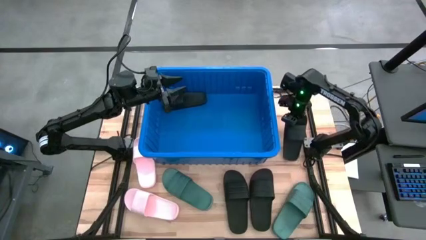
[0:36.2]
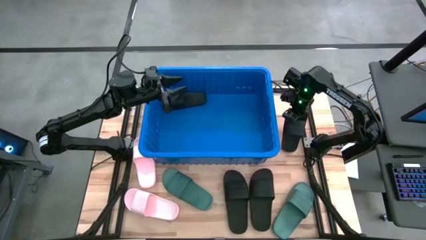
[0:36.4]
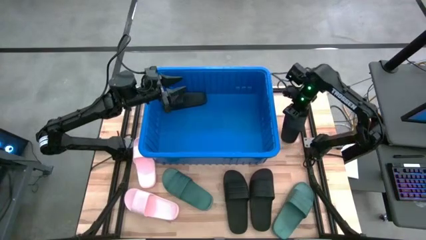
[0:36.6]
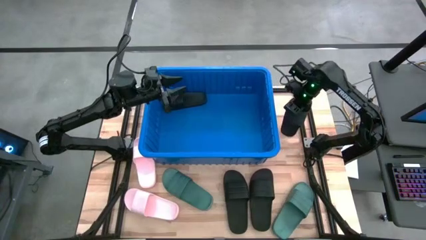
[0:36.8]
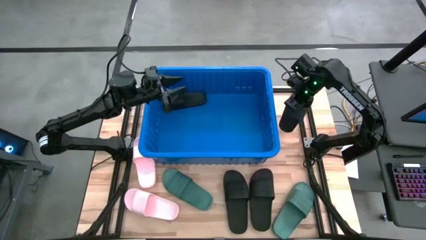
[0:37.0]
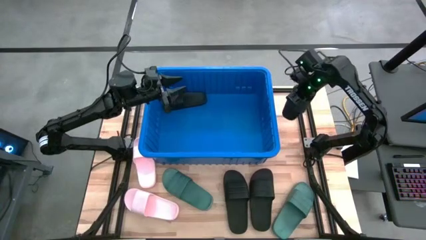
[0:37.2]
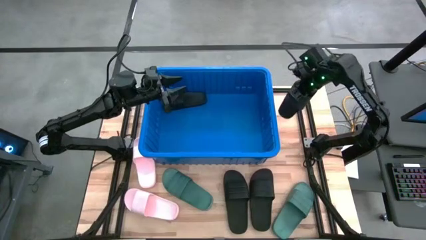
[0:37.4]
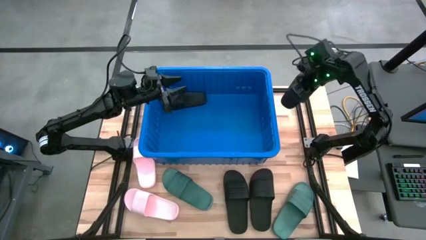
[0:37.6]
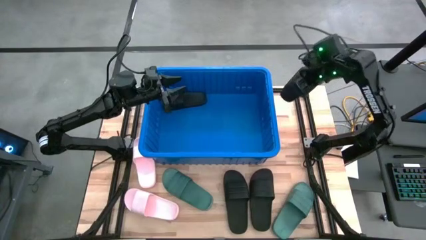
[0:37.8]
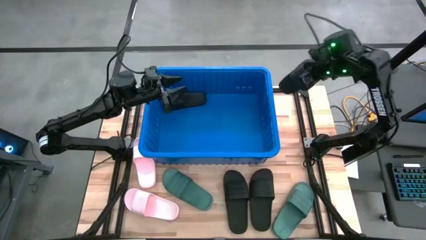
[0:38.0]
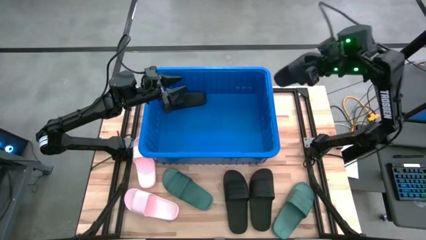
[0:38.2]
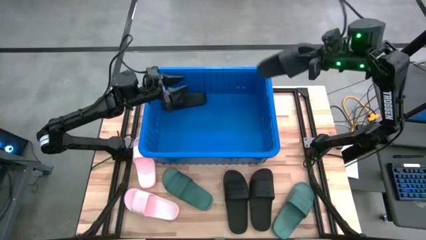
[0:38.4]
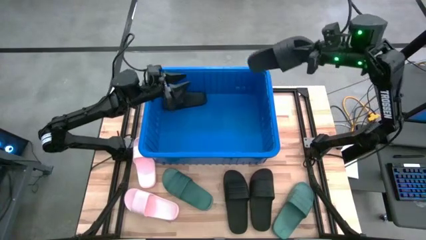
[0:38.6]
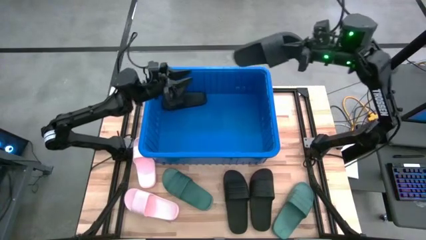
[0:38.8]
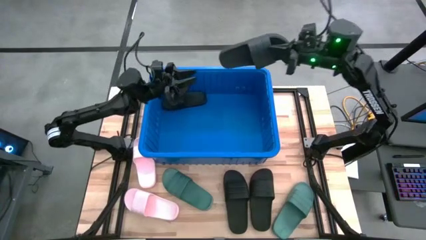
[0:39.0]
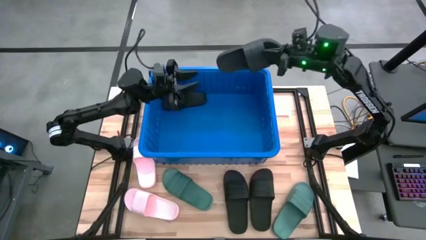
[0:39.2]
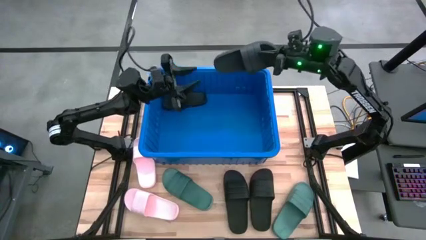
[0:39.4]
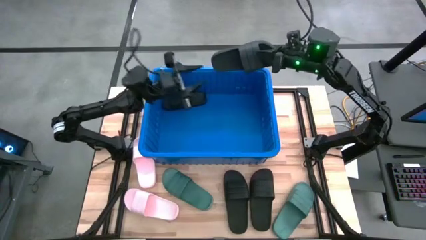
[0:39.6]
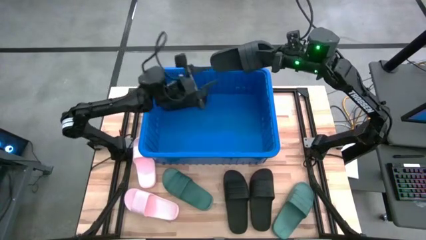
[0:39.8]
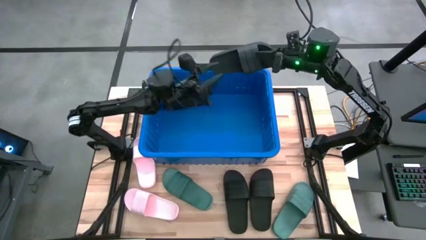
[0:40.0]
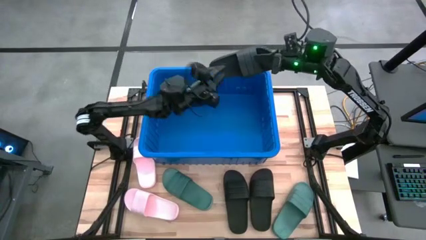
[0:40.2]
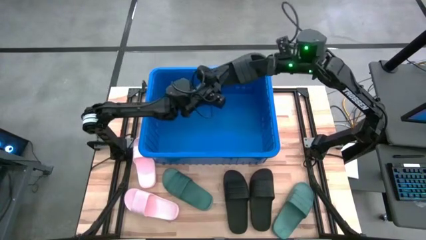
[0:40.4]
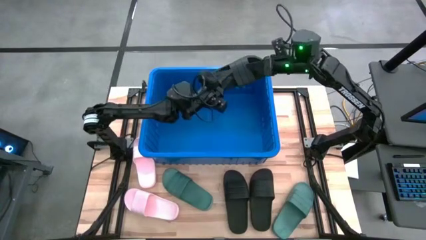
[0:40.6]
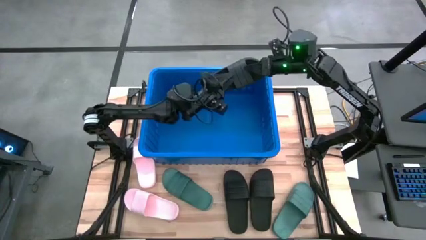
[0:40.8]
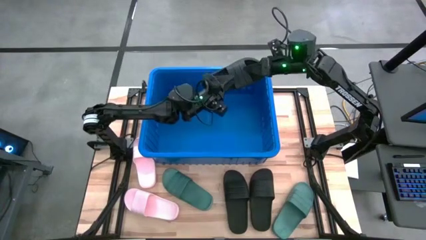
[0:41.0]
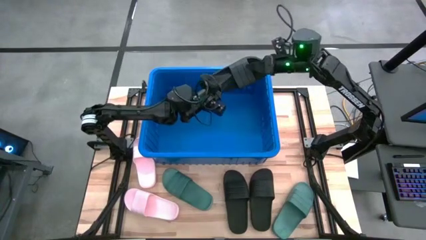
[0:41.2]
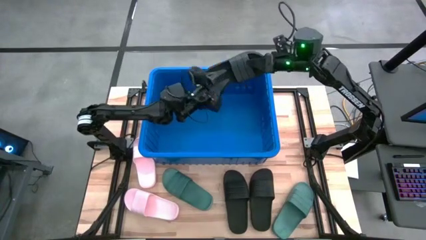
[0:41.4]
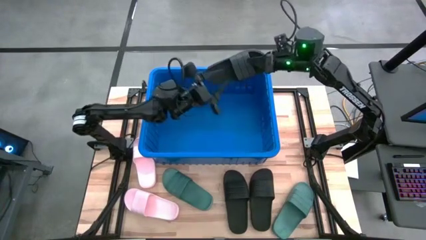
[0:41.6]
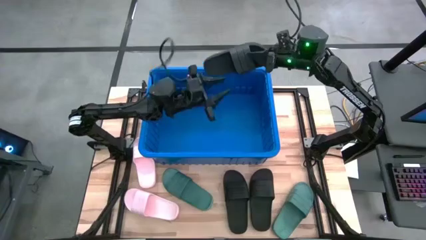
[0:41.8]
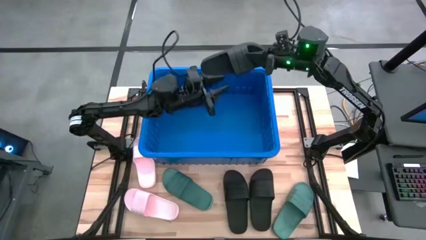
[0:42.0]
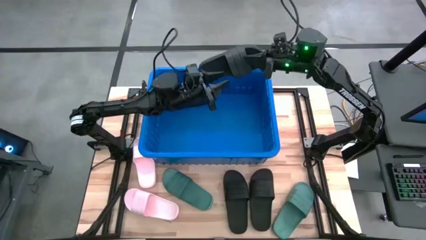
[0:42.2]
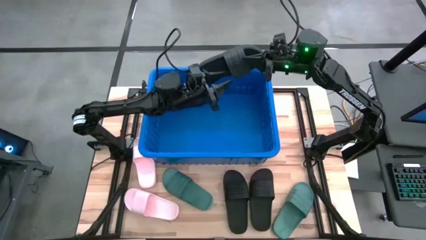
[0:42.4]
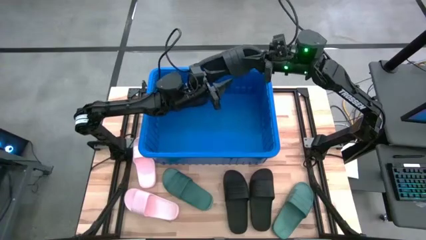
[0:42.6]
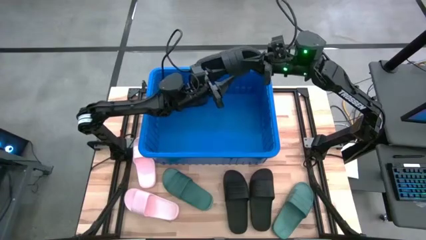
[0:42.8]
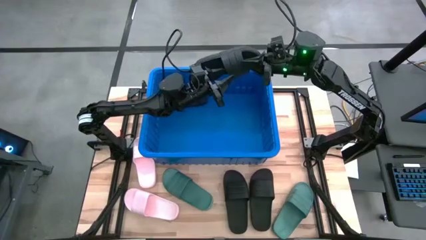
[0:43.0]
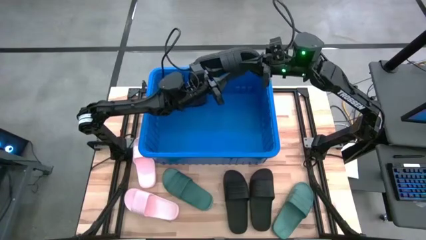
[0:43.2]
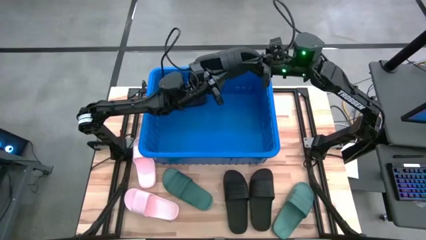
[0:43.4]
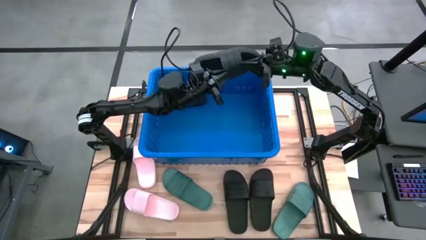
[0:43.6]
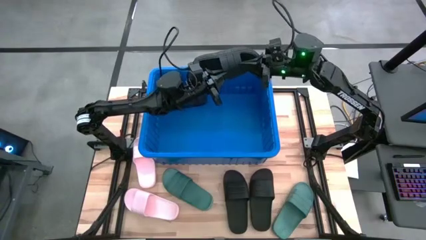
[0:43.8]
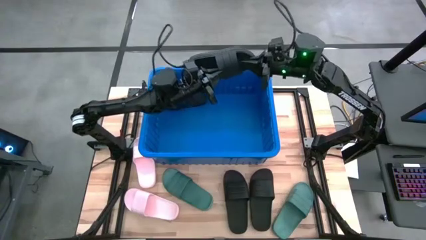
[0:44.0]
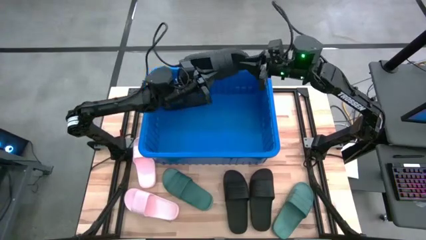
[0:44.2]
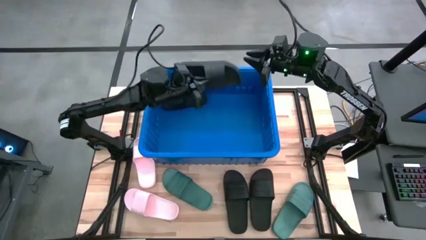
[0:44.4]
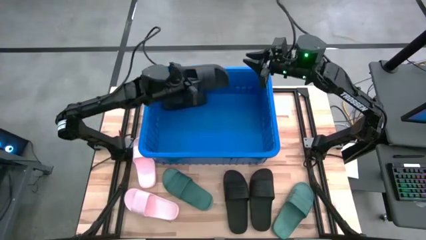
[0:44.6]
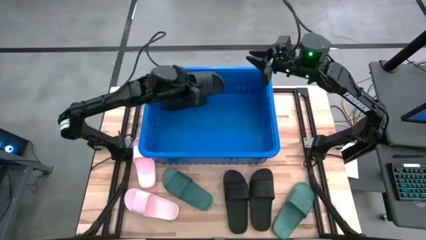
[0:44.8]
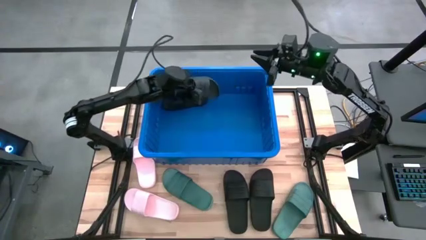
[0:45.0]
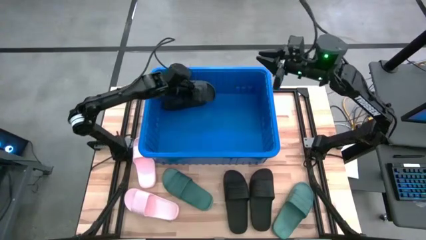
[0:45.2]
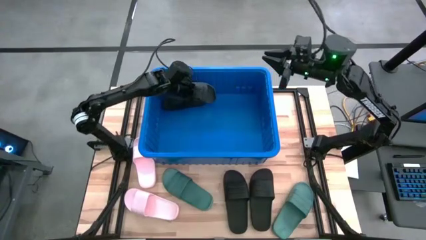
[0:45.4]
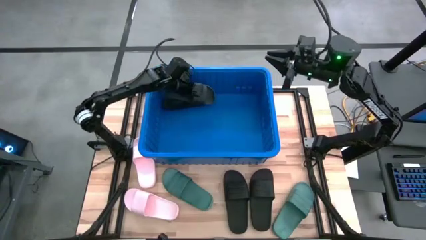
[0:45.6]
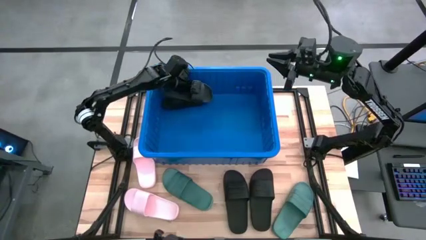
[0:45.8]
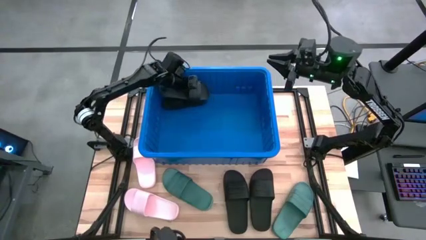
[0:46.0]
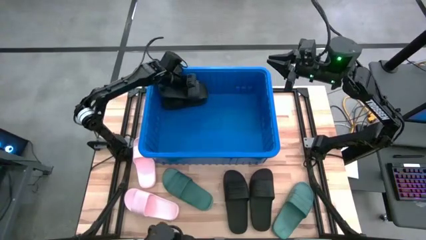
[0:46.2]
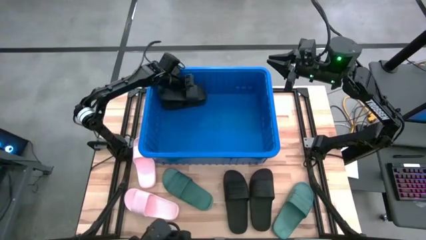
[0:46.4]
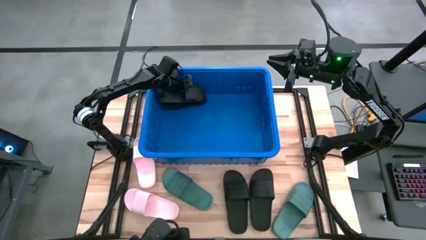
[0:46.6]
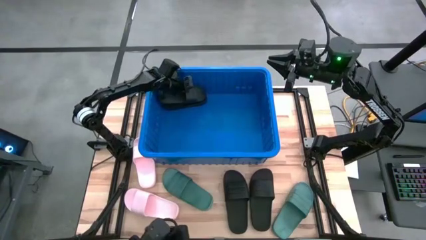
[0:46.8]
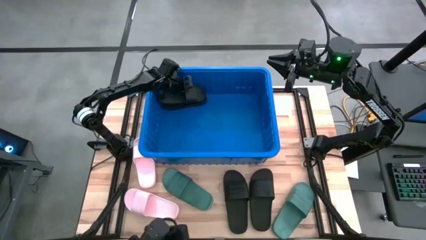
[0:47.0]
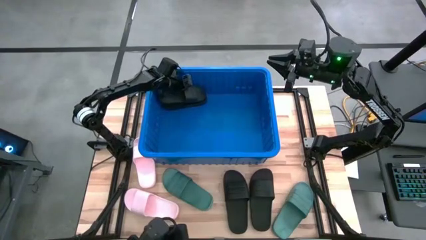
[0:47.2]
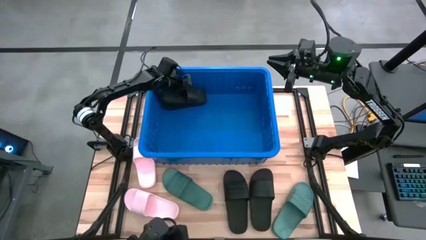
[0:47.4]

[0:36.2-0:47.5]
Task: Pick and place slides into bin
Put the black slide into the blue container

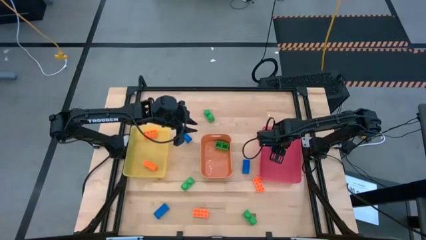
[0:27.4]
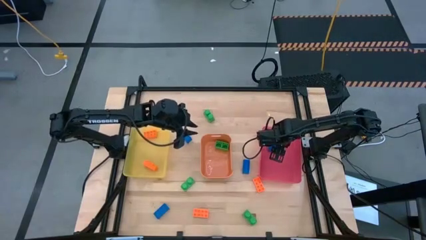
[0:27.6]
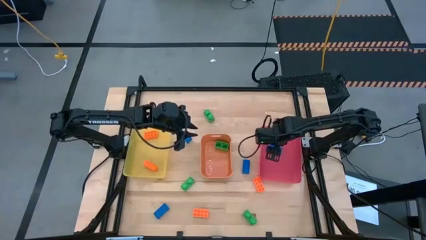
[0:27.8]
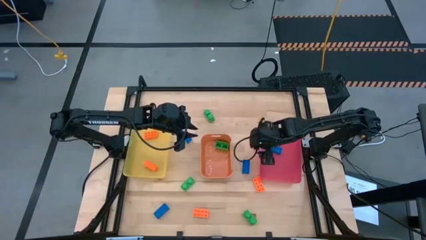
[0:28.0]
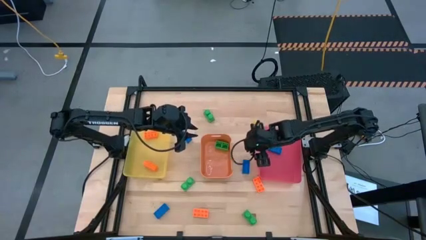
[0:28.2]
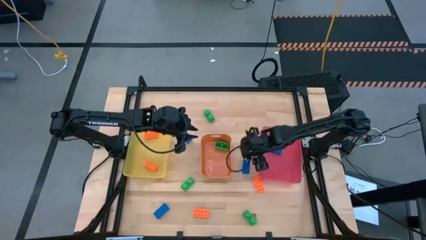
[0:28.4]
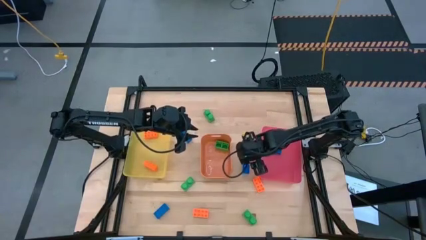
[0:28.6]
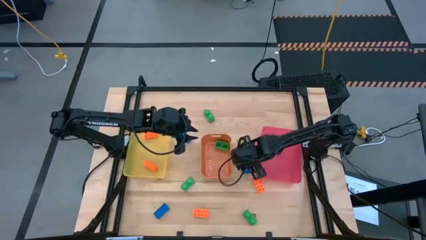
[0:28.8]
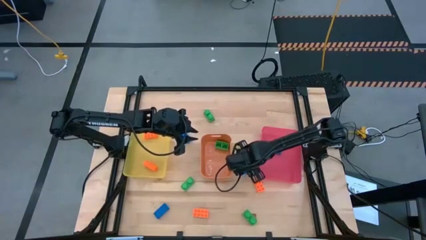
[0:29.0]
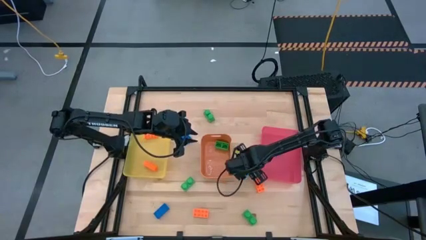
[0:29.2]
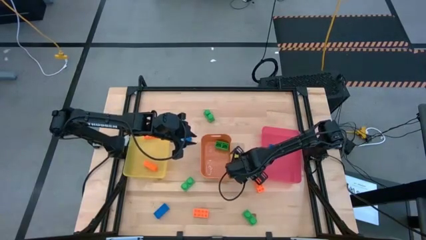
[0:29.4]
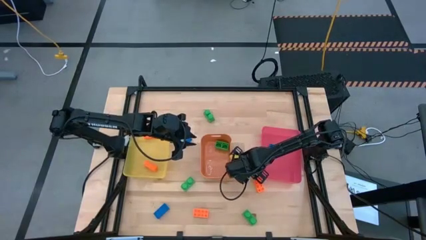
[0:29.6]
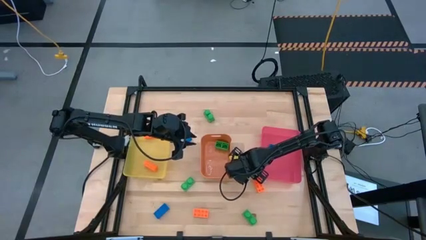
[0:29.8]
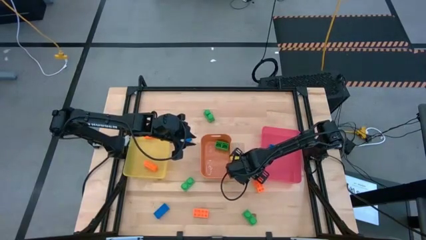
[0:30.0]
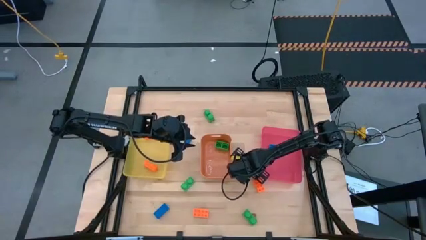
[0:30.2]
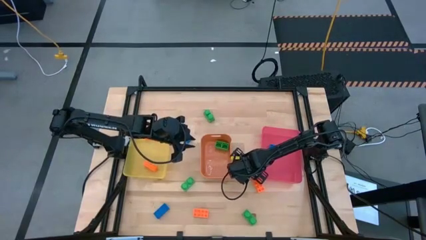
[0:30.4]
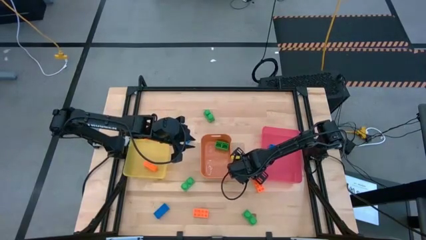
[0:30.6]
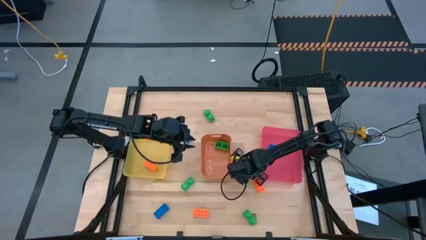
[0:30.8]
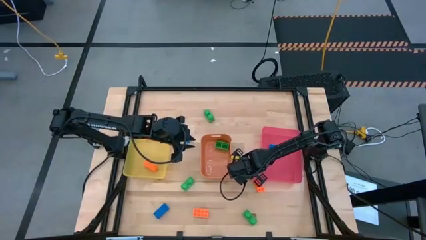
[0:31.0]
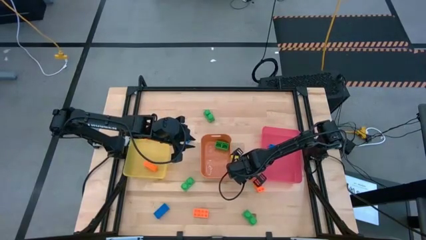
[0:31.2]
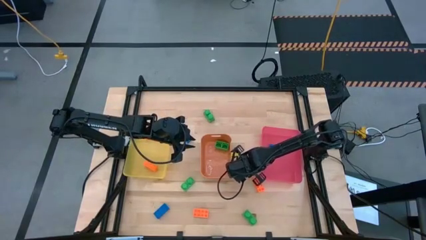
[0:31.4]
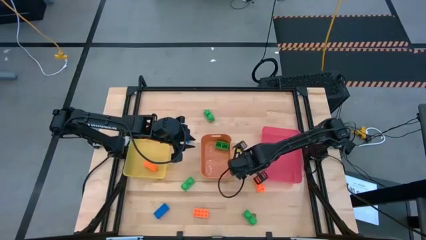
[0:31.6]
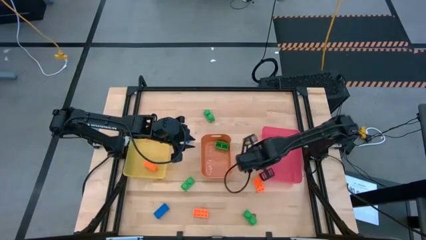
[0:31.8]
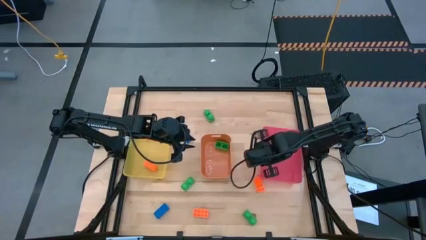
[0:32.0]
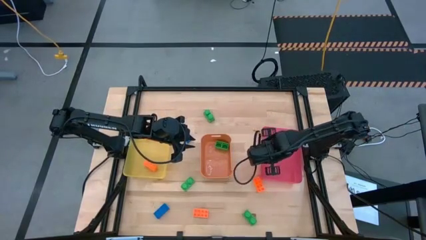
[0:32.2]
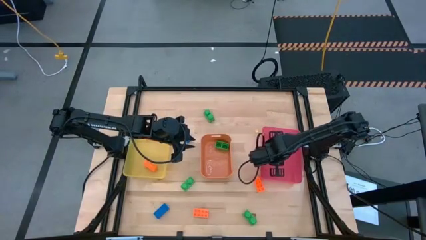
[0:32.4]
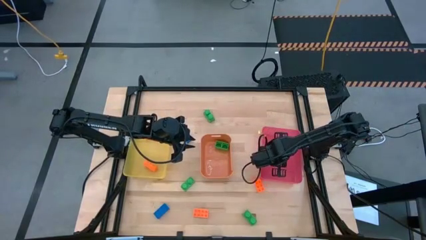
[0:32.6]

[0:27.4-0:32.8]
Task: Sort & place blocks by color
Put the blue game piece into the pink bin
